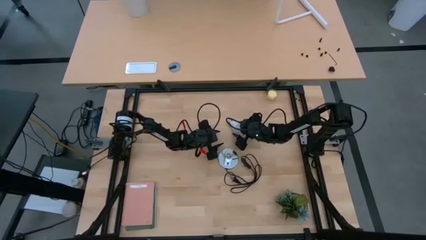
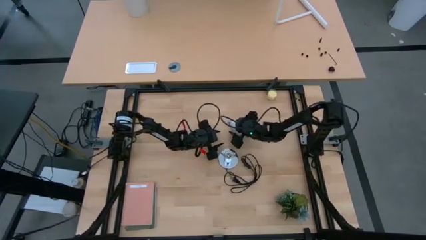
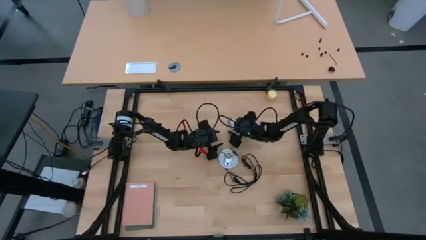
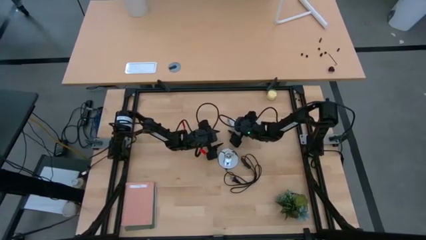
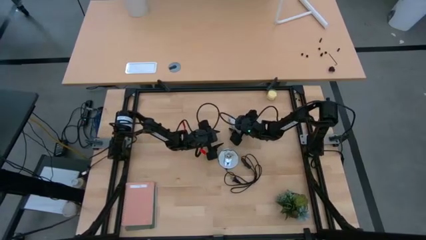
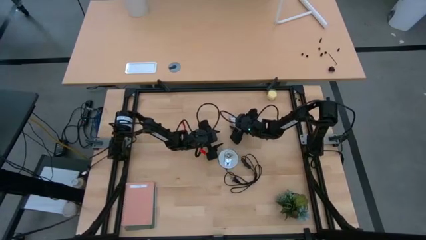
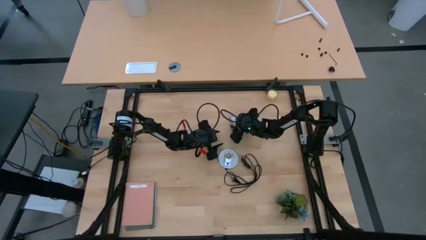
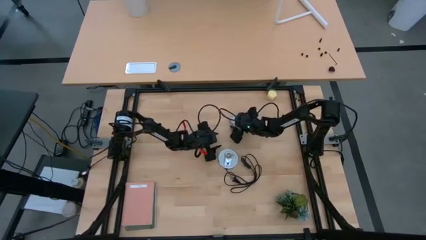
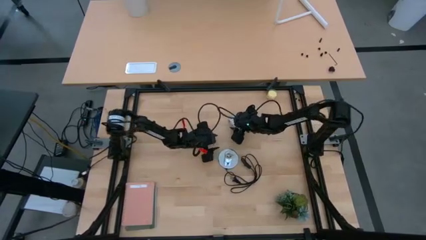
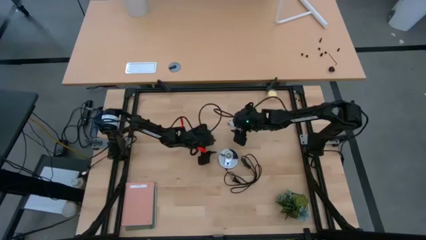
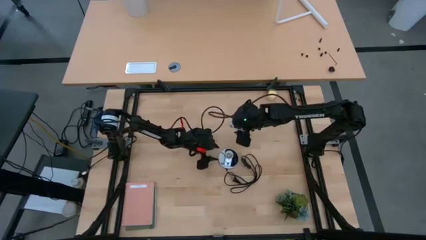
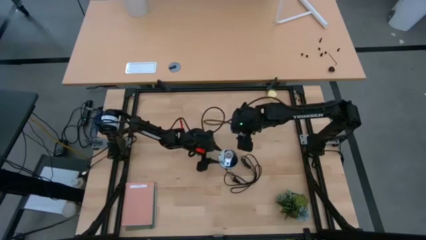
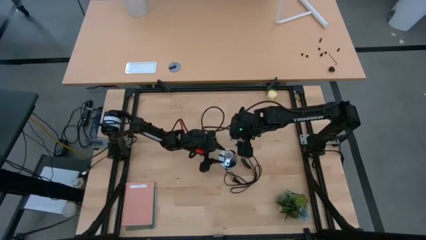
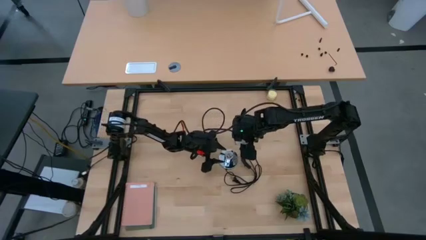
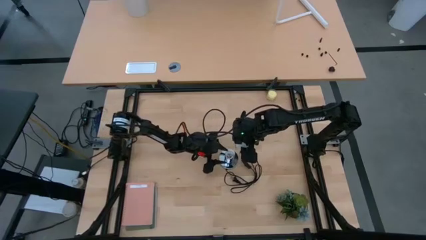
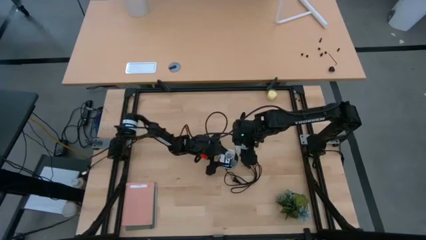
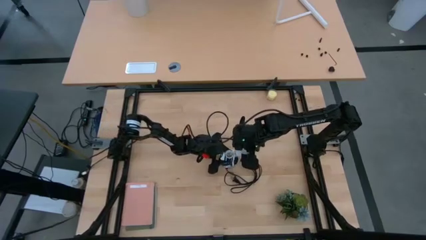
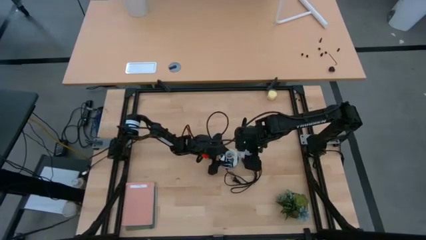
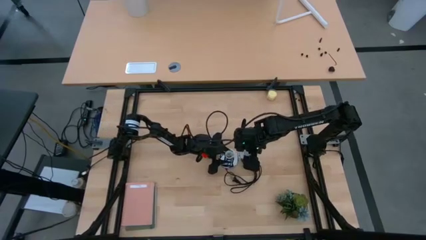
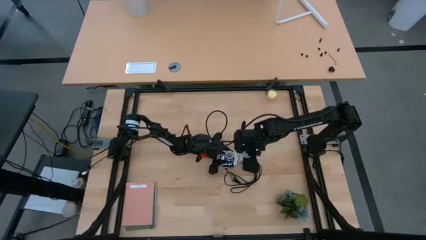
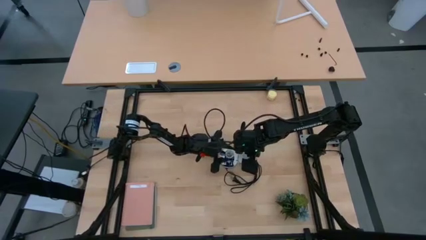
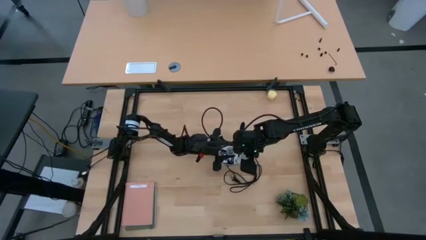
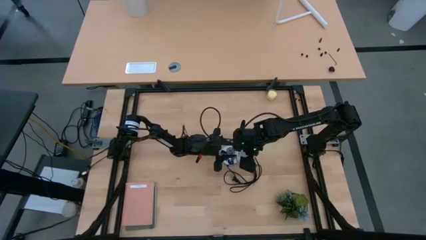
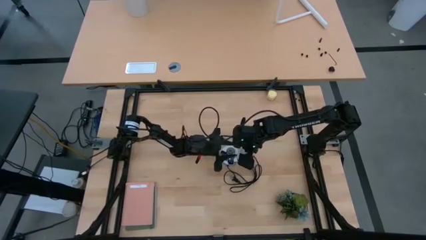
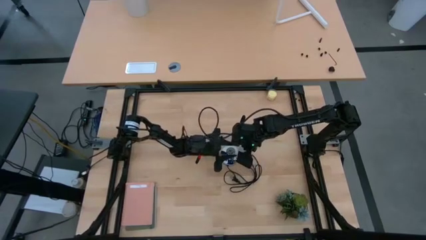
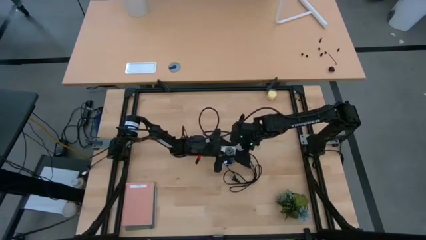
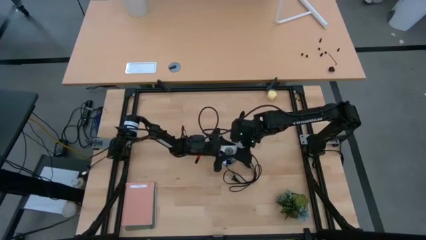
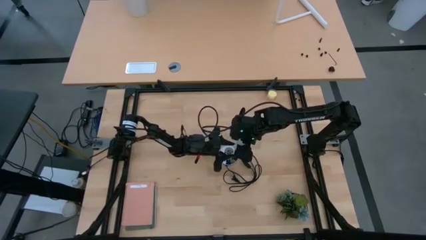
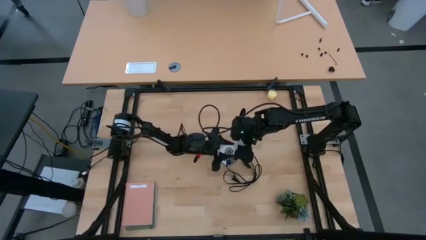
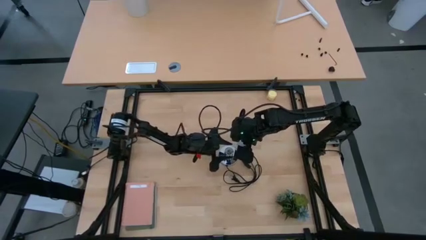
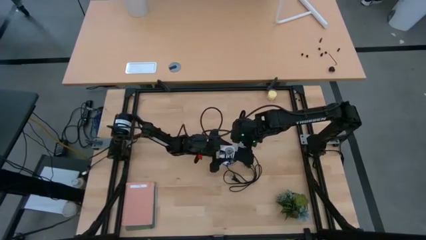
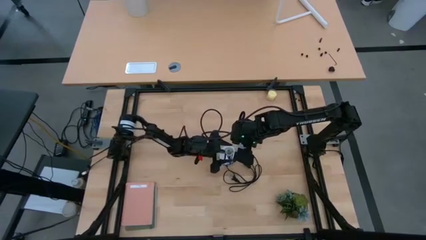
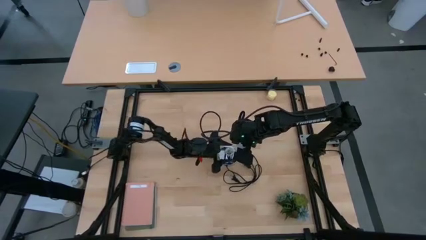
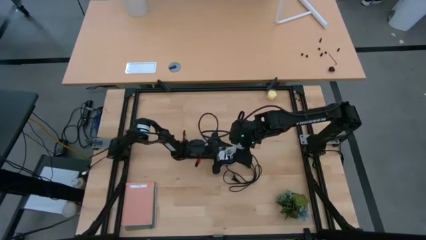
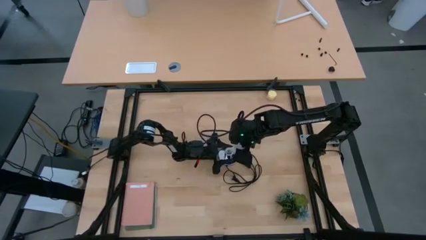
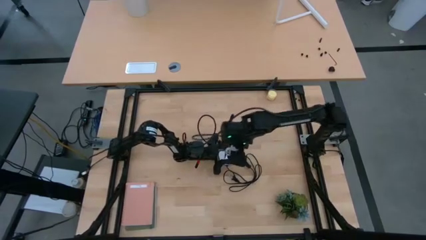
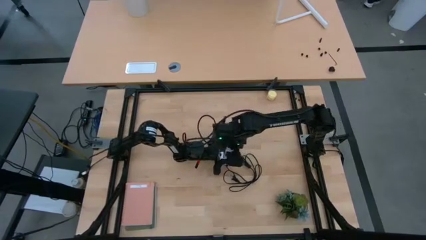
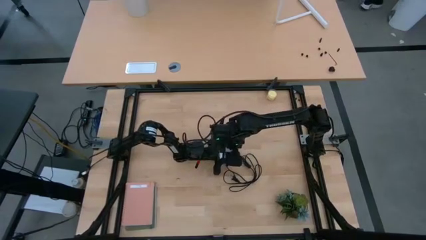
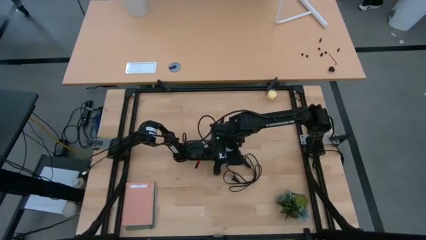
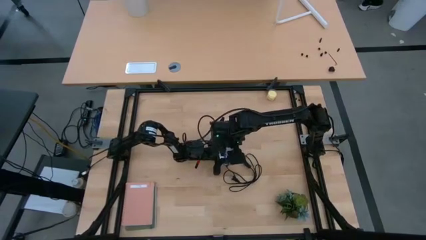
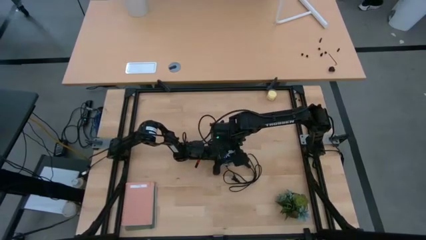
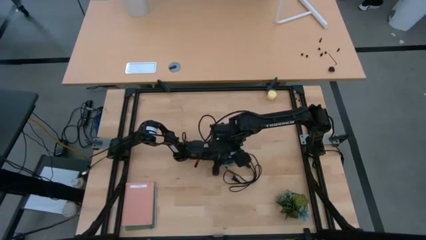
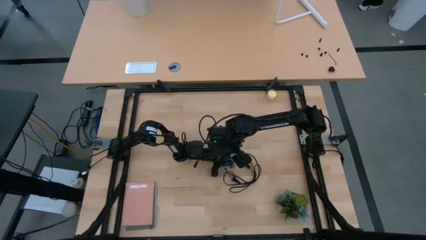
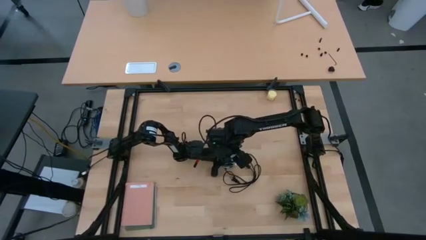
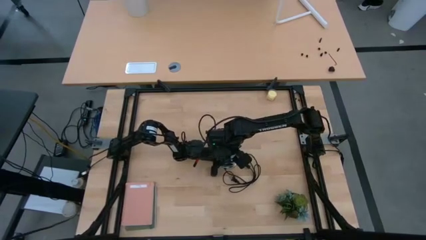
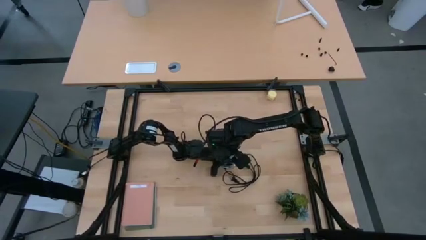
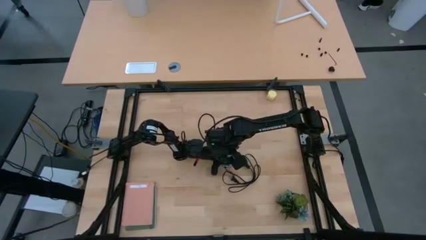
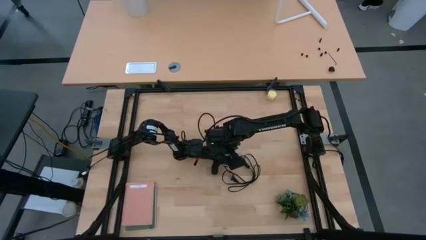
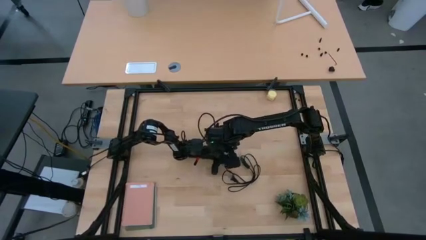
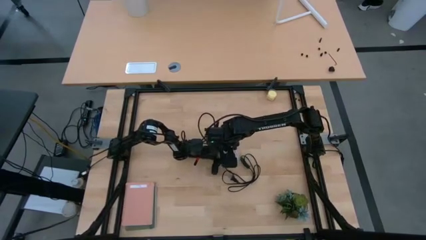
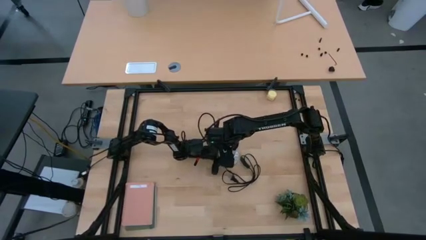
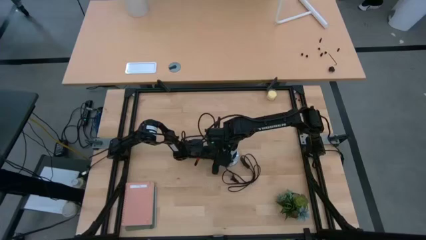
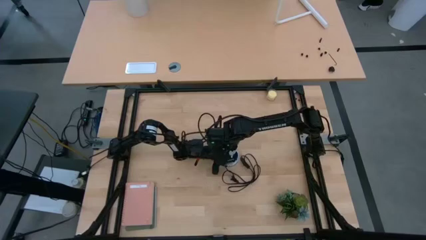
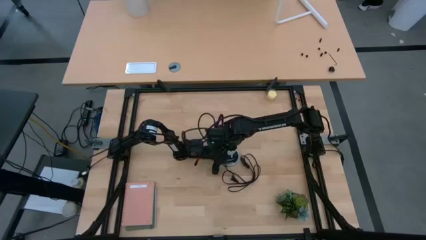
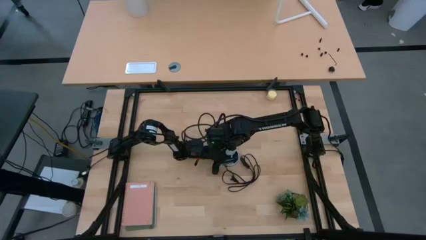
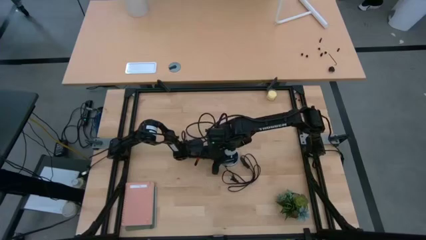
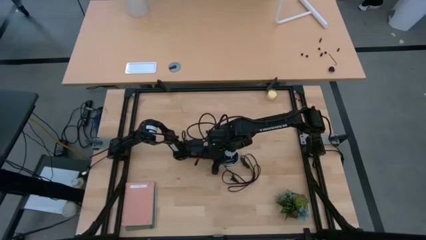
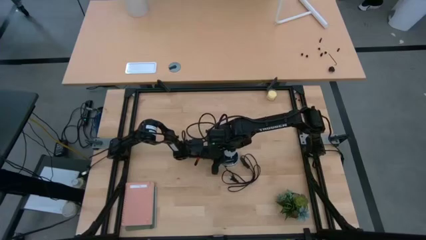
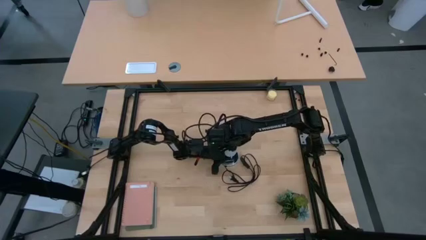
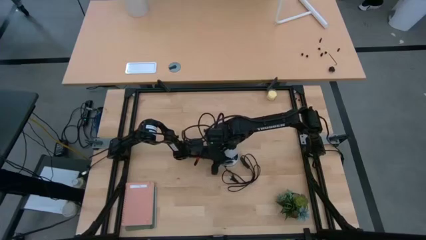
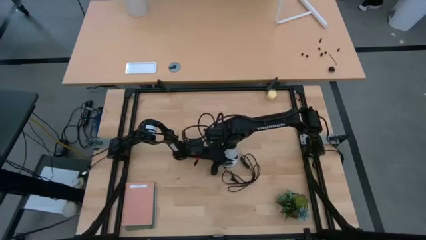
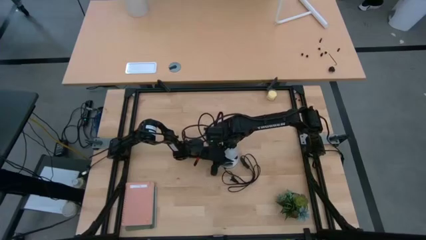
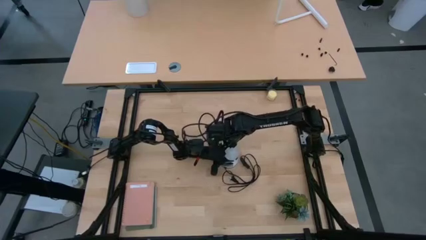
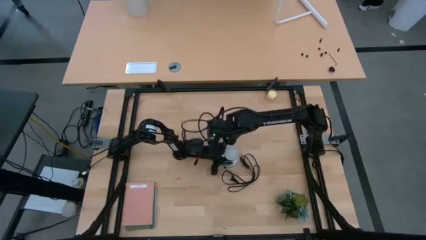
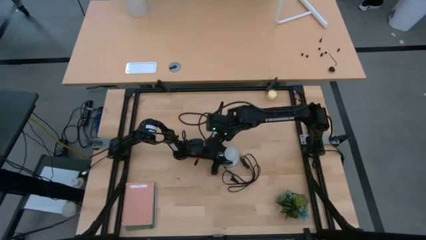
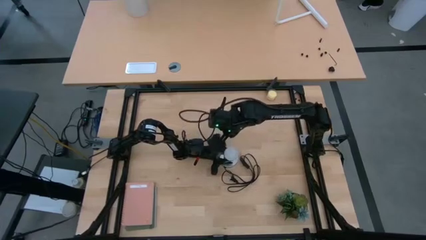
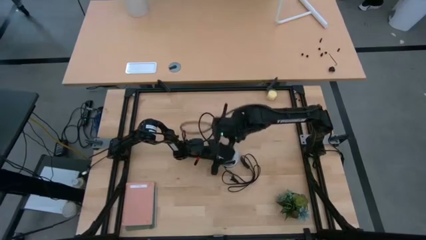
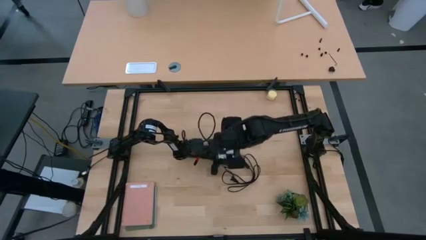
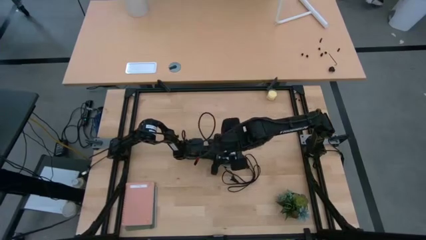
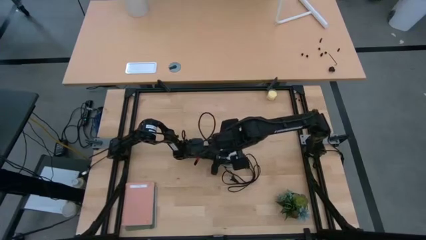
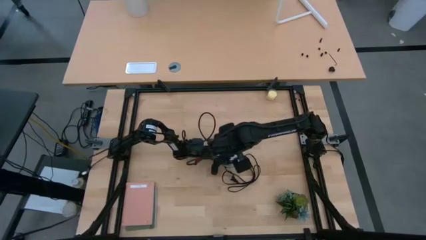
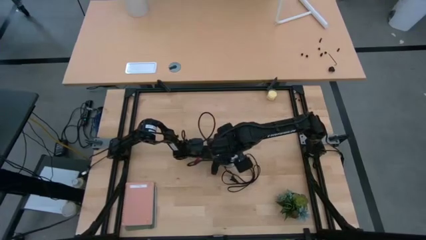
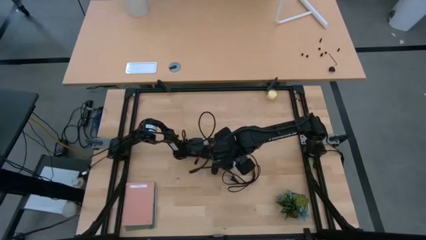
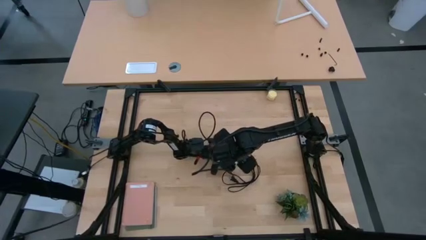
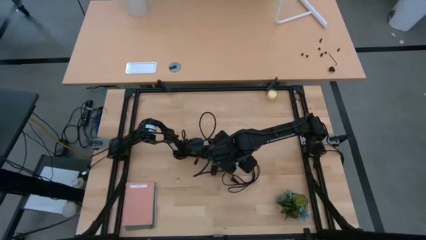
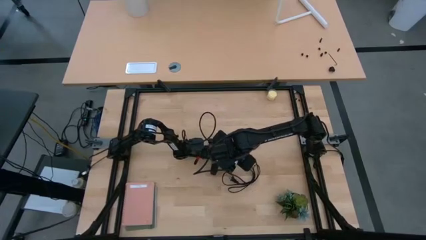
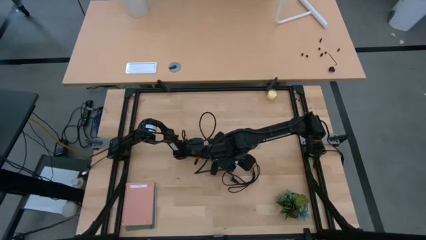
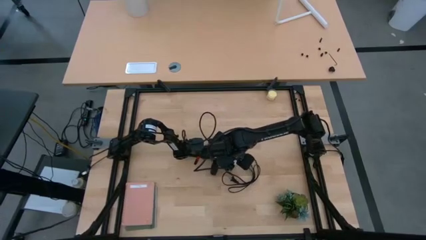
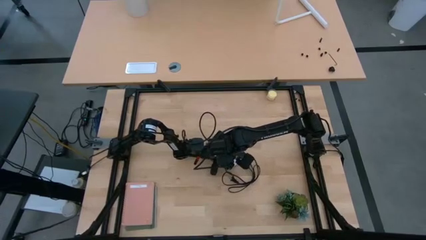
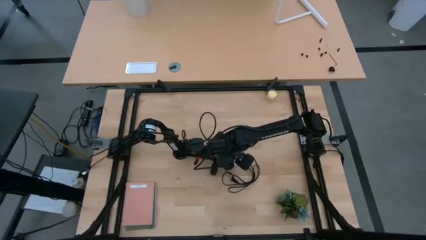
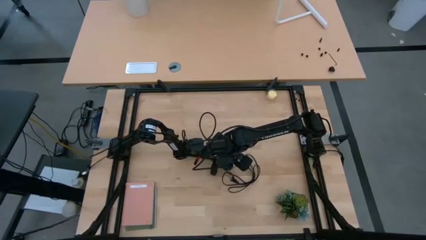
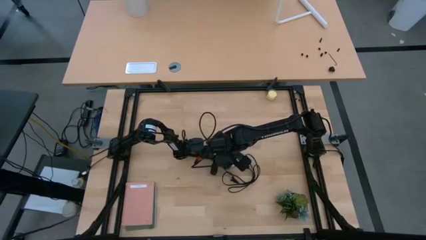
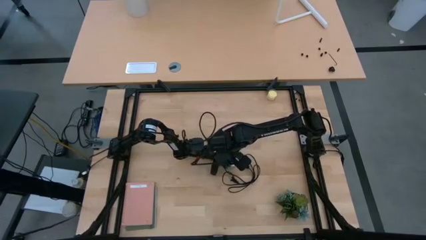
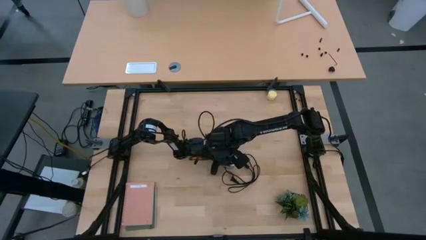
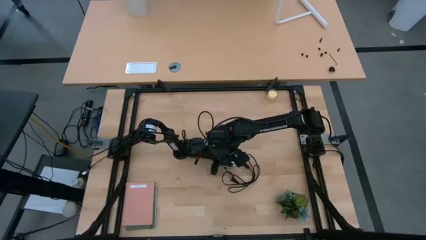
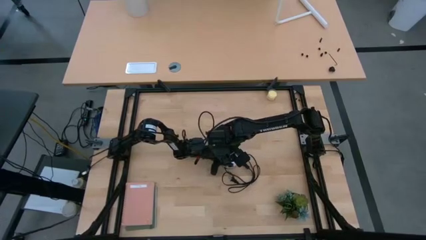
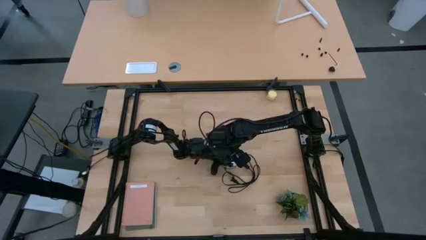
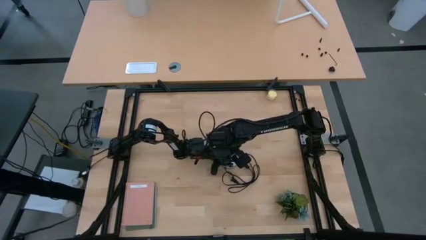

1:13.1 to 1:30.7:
Task: Screw lightbulb
Insert the white lightbulb into the silver lamp
